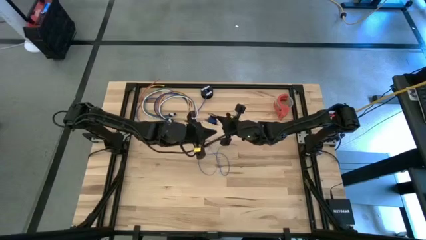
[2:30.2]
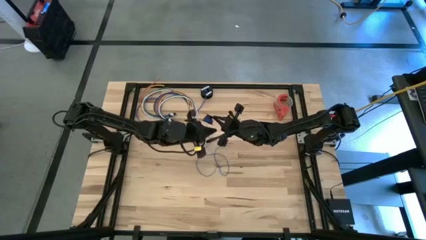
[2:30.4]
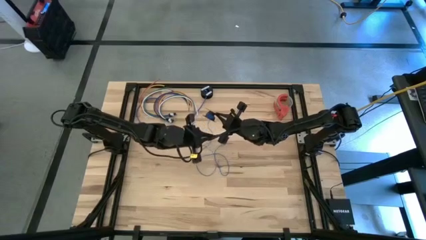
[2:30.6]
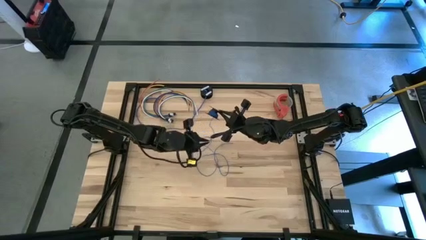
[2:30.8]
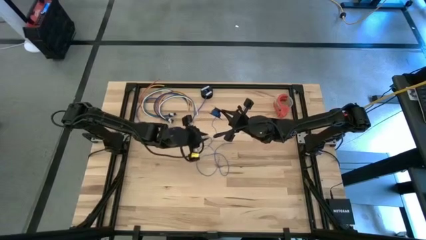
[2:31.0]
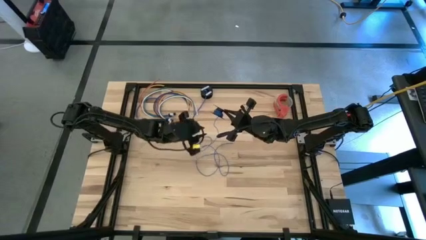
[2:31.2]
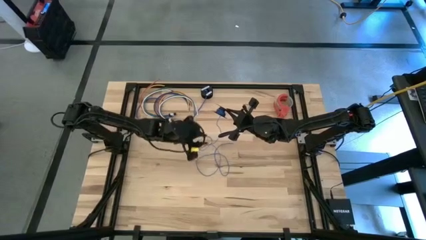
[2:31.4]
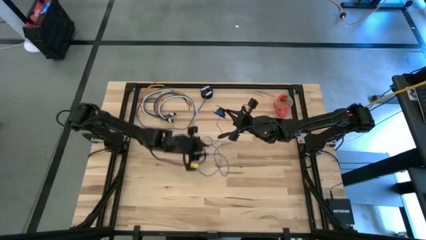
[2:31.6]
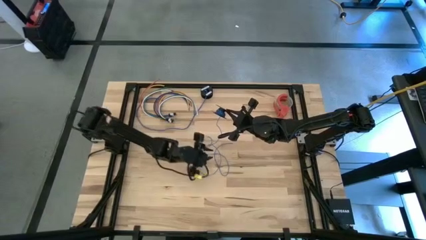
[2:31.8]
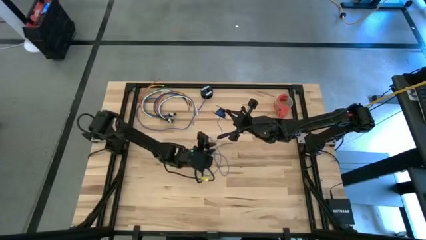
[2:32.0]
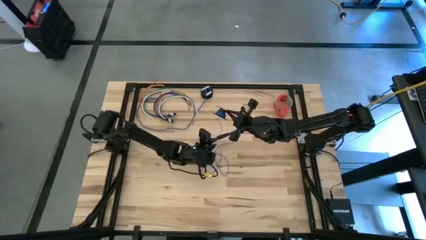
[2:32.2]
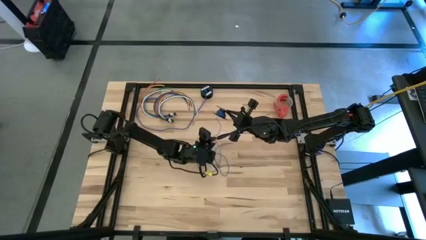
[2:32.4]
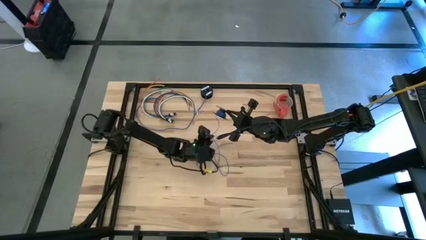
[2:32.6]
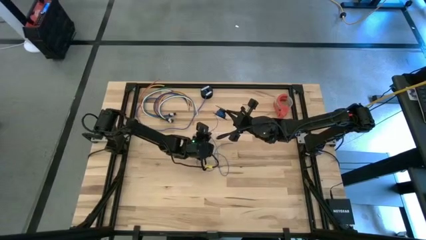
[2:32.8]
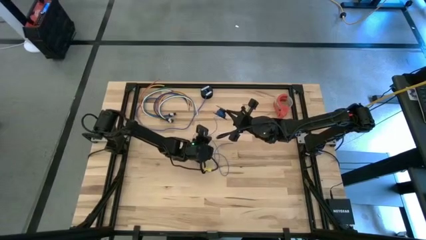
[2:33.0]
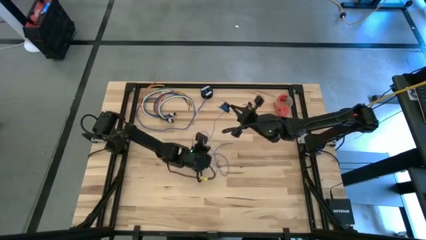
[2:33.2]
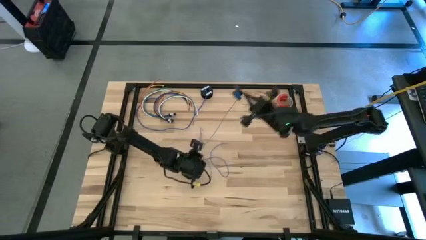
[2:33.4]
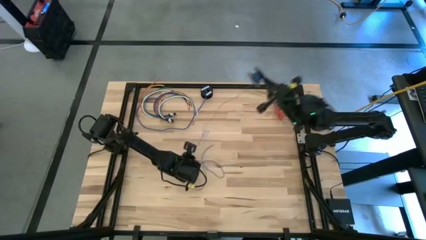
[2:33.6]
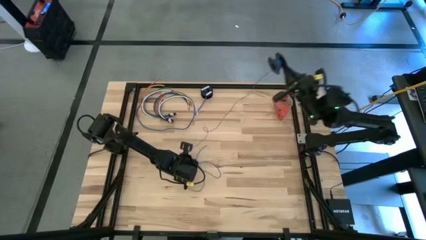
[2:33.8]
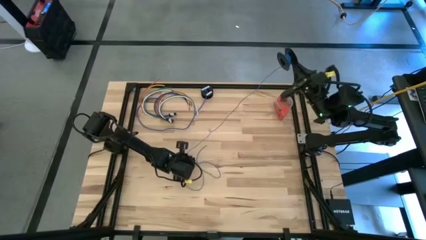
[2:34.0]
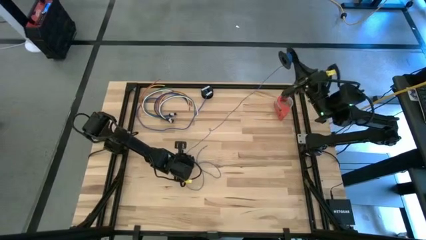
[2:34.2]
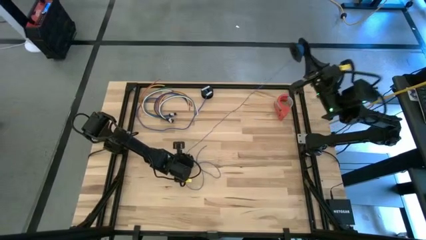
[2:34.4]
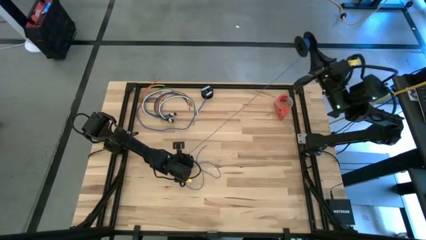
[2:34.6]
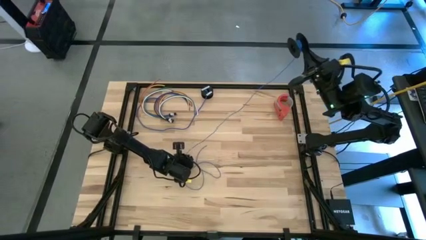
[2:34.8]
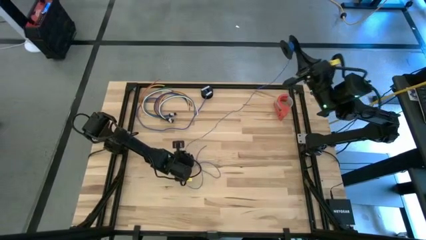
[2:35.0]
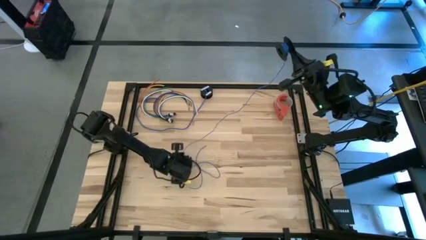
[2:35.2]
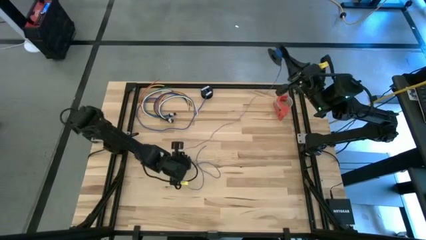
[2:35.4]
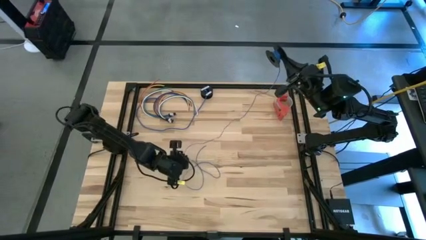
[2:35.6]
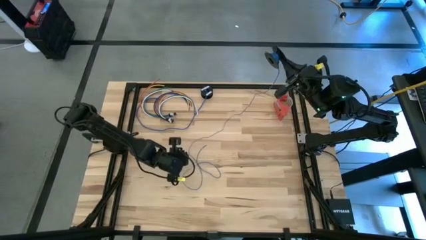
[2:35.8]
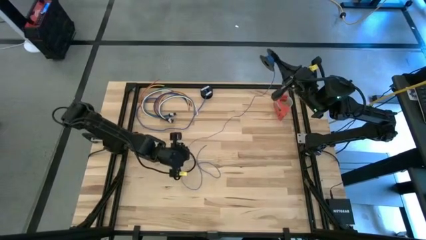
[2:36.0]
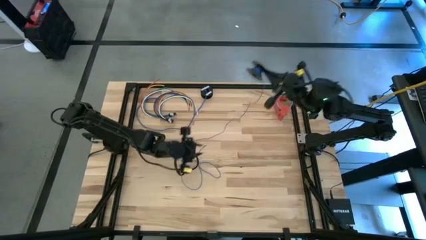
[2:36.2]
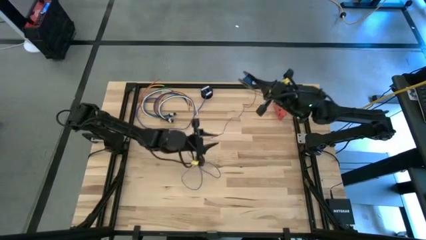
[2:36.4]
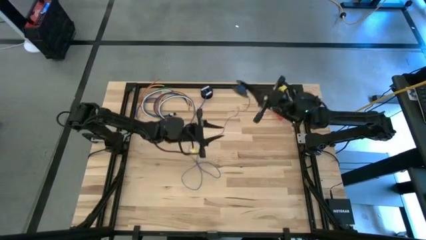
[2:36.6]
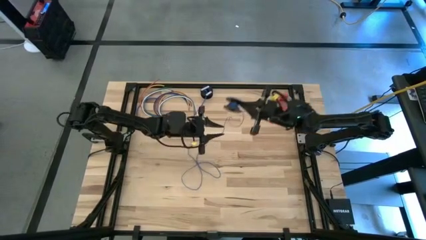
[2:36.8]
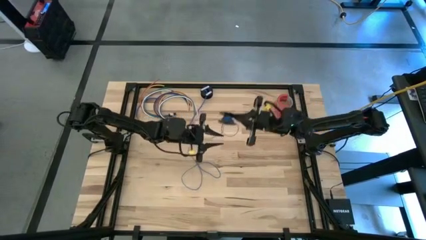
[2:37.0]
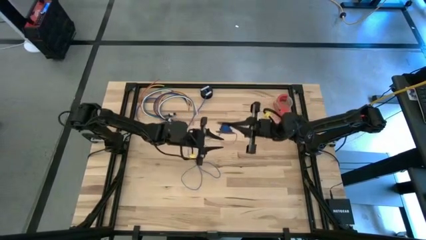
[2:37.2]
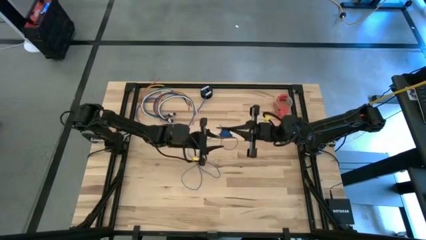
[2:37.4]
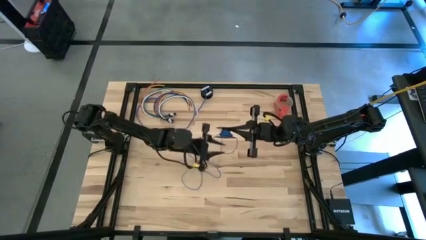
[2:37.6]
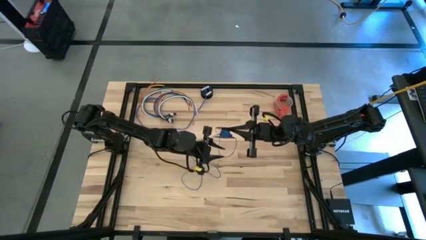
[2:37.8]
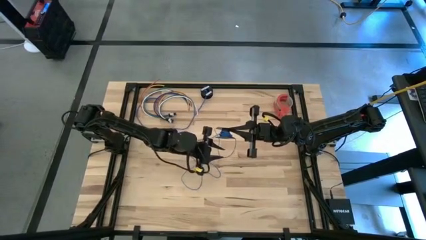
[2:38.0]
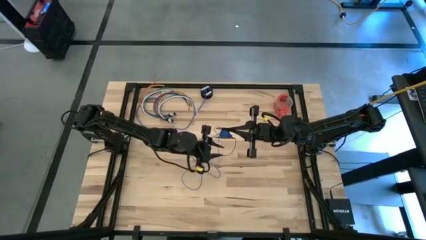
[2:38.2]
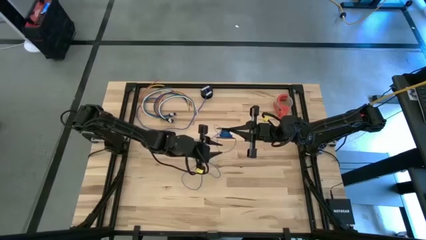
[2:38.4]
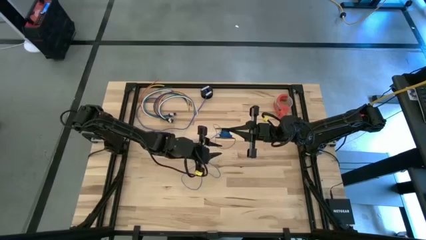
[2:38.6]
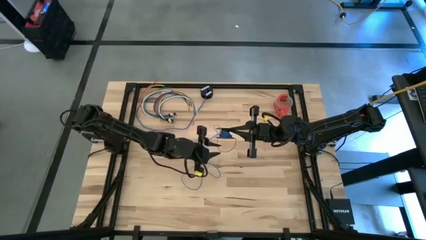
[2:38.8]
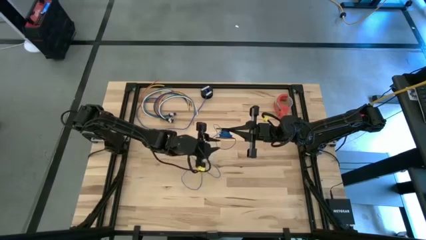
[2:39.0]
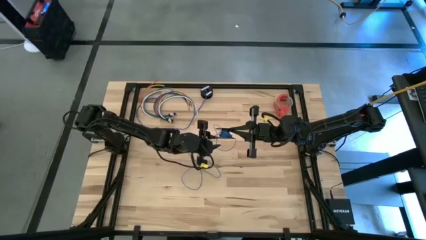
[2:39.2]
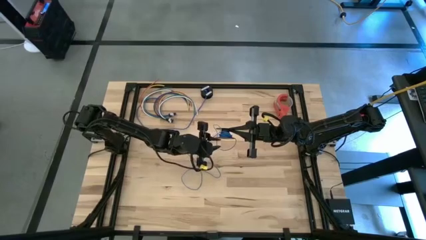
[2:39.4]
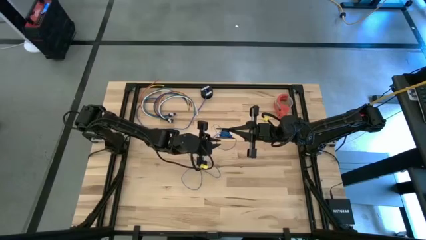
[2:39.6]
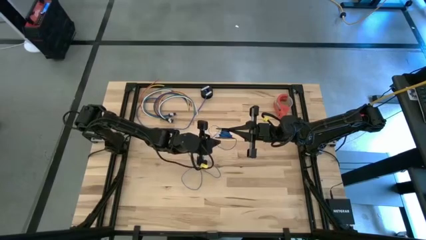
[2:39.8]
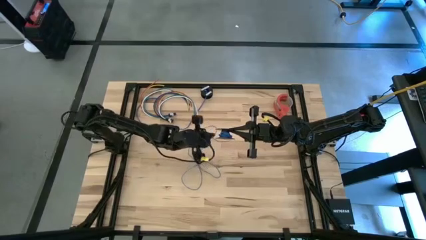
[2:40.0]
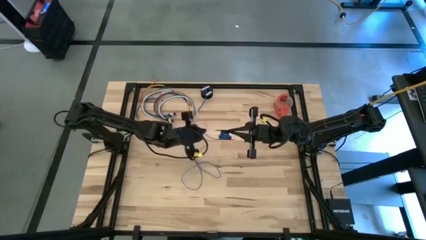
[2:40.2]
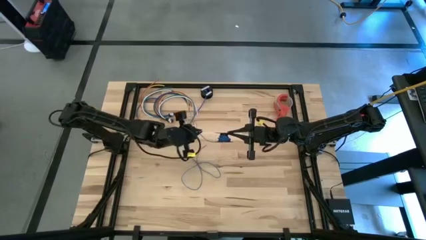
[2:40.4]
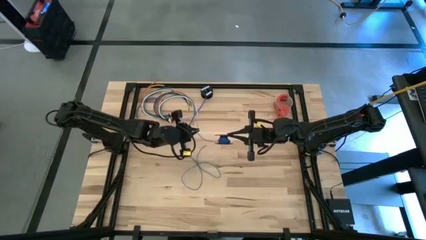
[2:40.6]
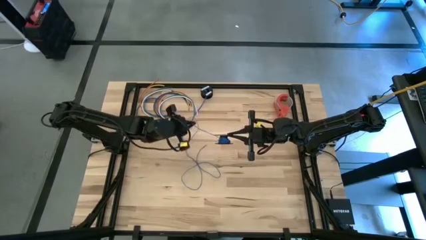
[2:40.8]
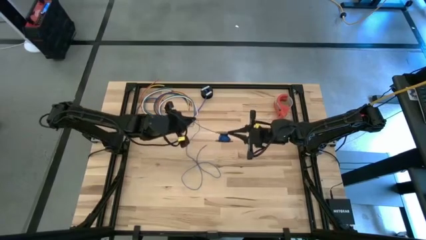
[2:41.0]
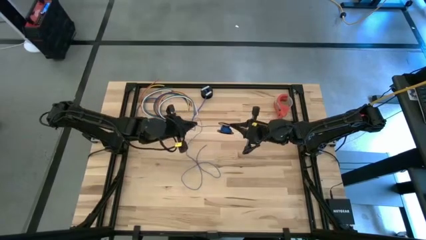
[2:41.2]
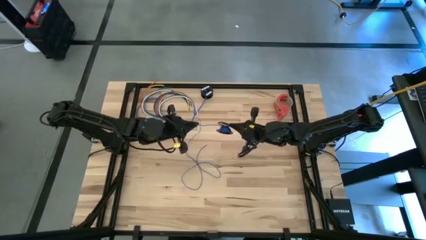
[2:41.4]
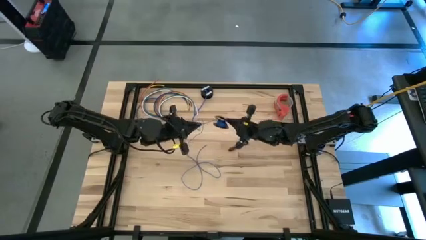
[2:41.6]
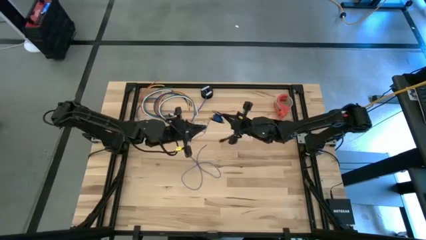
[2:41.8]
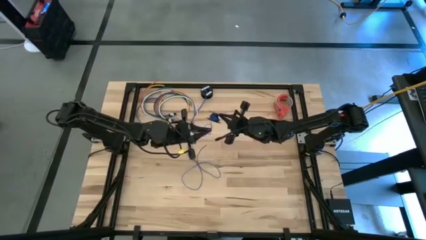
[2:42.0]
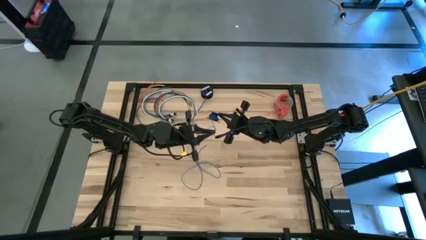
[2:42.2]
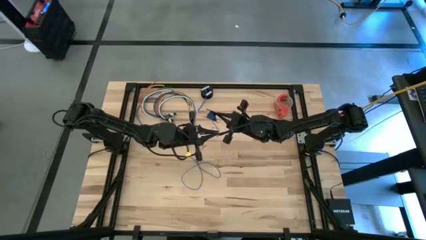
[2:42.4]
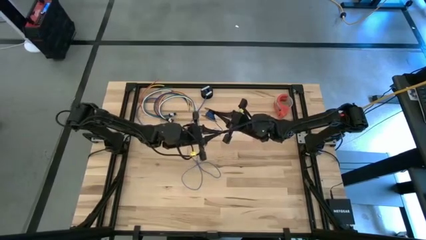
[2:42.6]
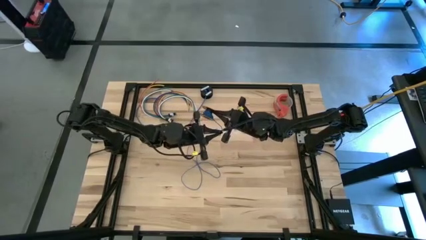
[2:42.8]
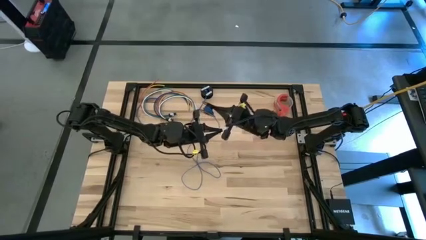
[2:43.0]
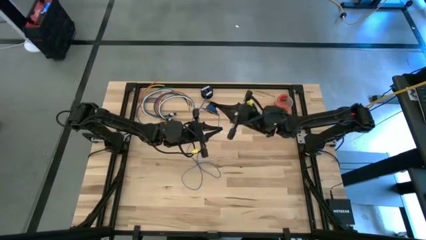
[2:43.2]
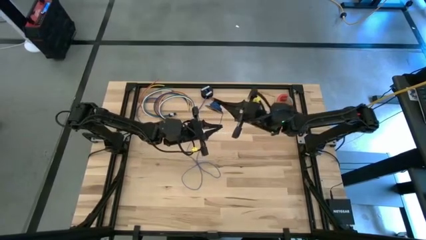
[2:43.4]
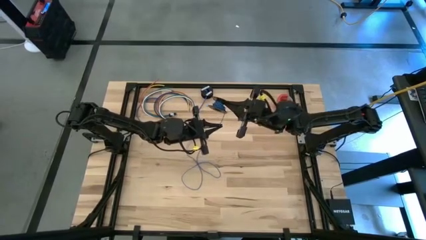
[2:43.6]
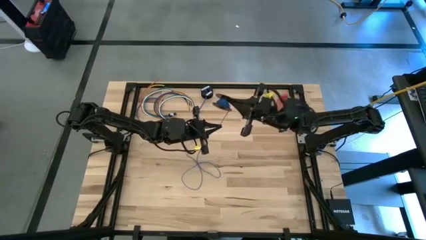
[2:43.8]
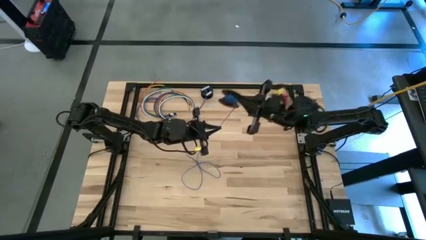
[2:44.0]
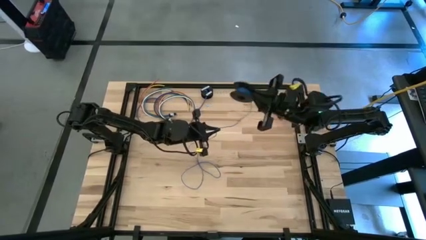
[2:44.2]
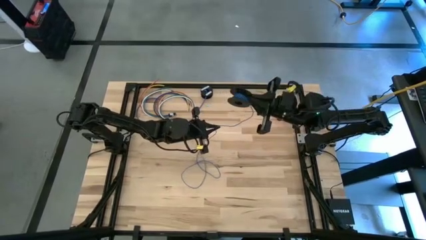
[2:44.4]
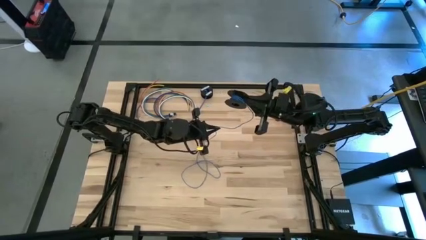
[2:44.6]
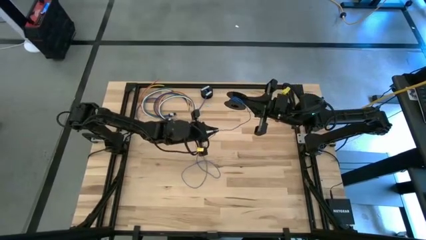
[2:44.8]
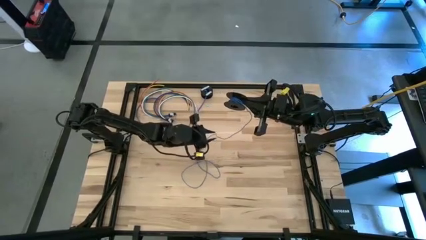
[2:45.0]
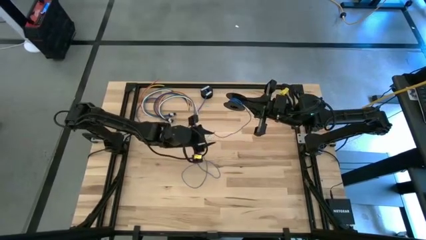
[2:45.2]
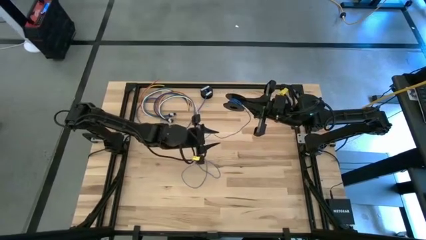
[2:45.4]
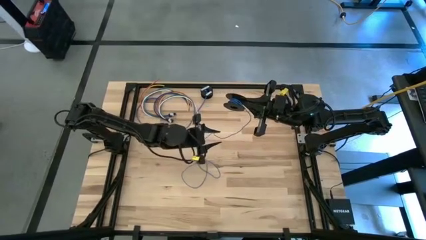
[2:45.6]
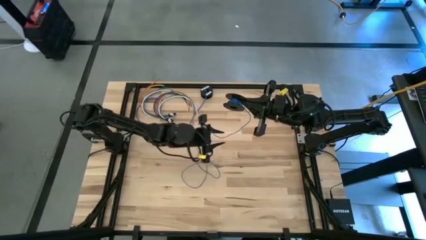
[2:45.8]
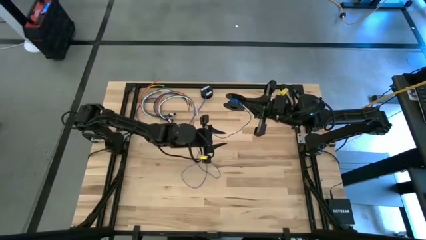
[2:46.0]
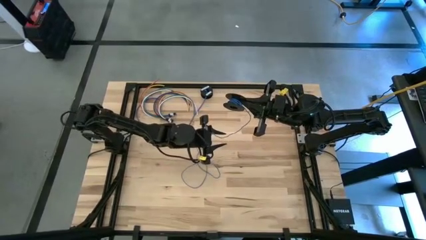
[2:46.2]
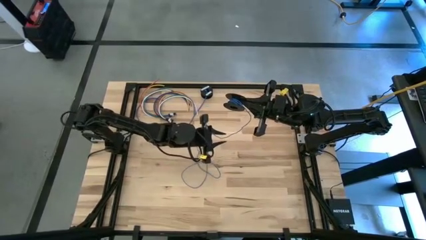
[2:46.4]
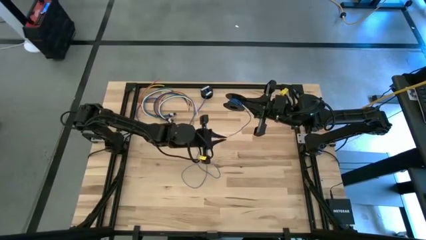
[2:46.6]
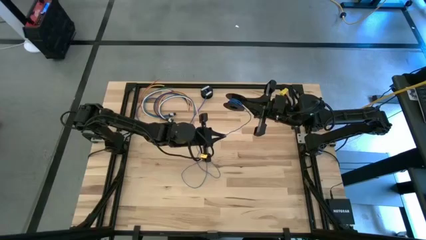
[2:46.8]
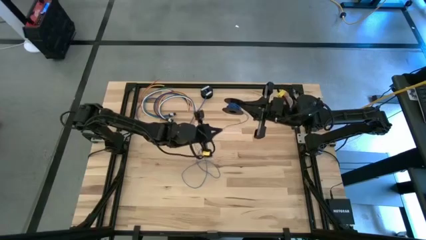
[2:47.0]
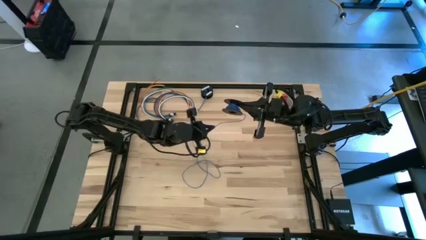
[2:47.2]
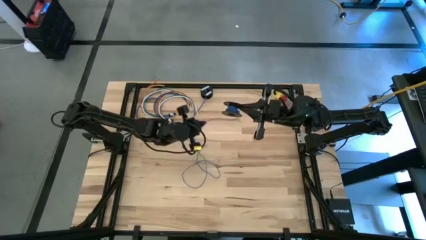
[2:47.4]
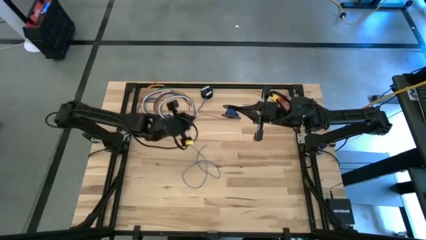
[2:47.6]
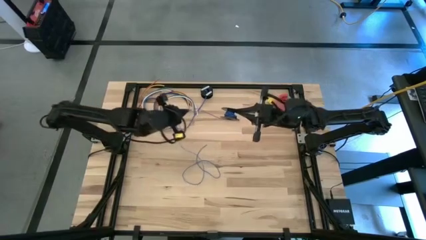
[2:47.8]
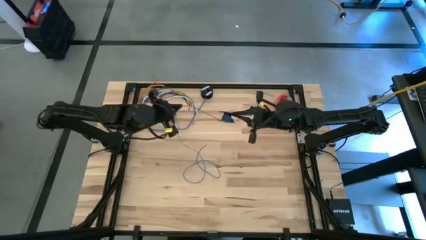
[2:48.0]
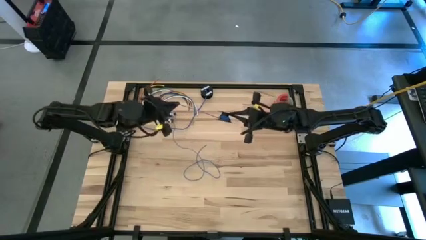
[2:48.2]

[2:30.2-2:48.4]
Task: Coil cords
Coil the blue wire onto the black spool
